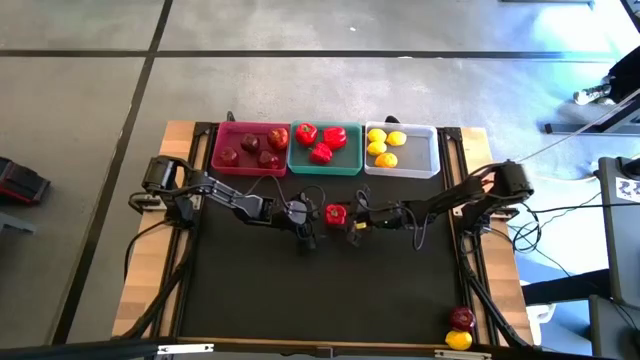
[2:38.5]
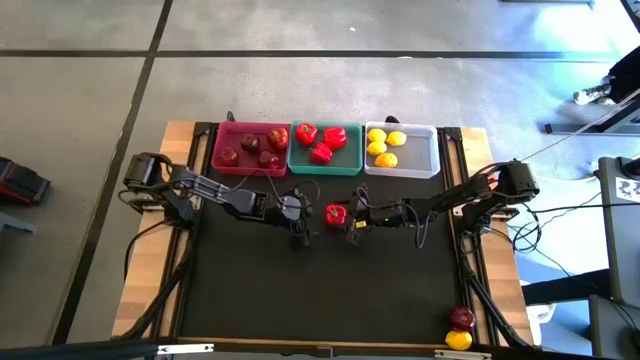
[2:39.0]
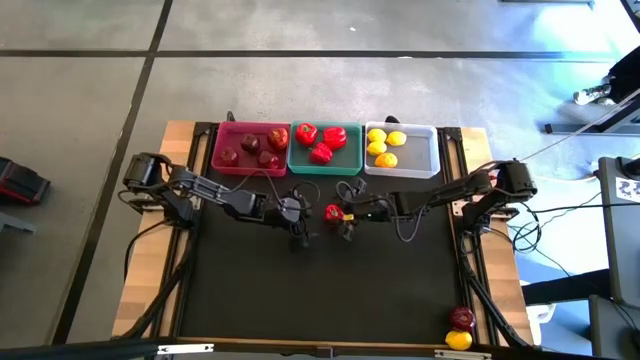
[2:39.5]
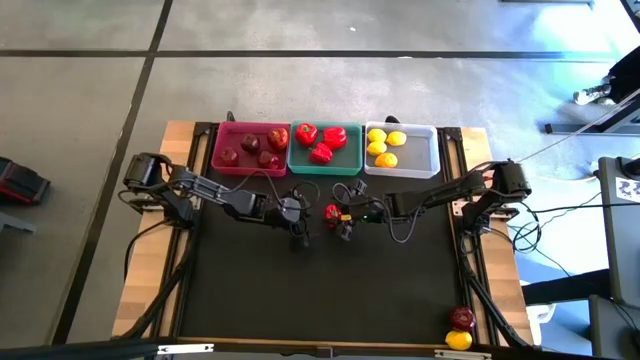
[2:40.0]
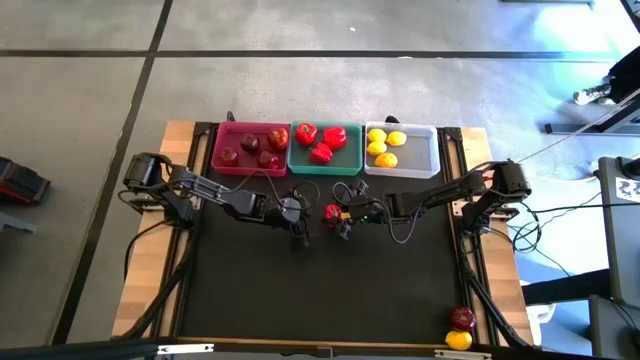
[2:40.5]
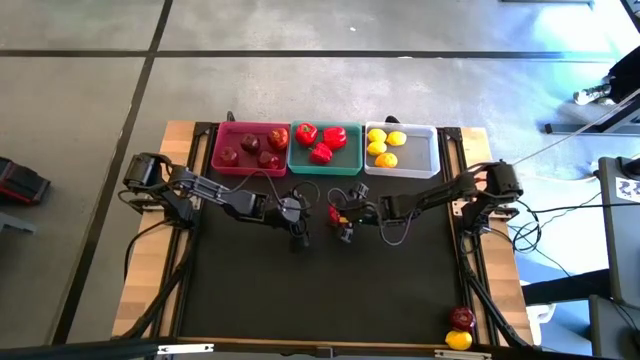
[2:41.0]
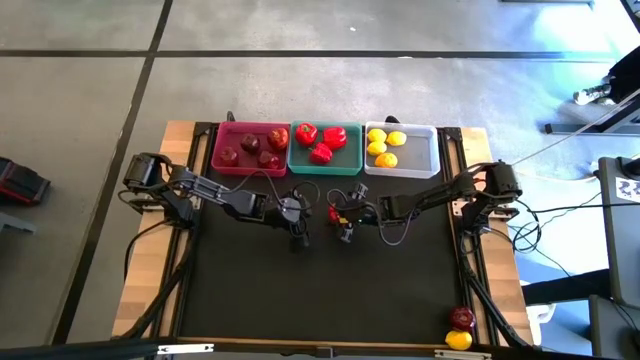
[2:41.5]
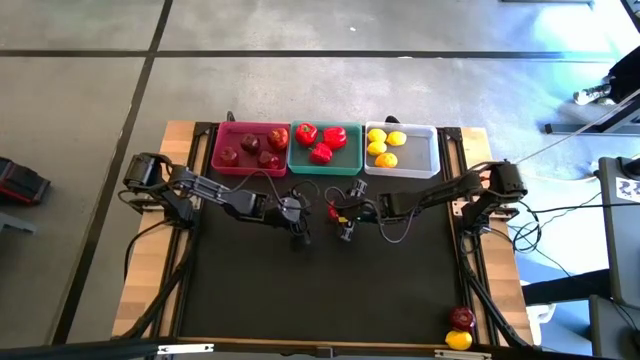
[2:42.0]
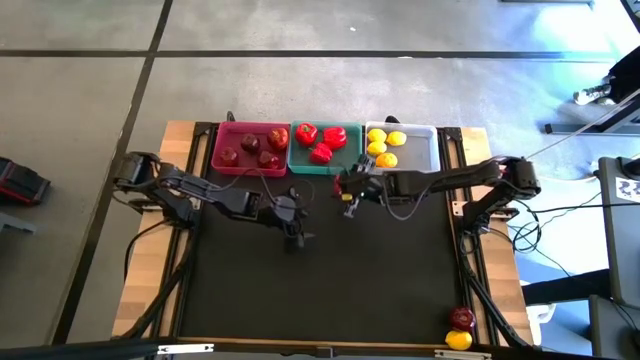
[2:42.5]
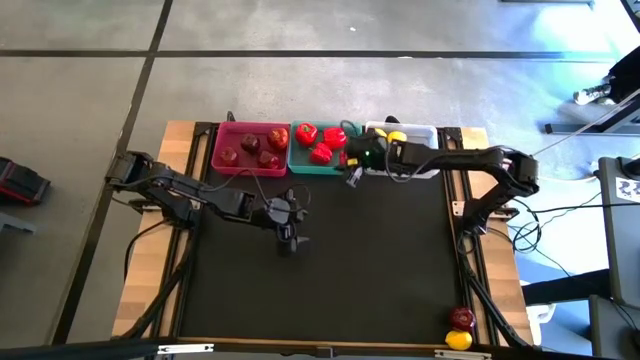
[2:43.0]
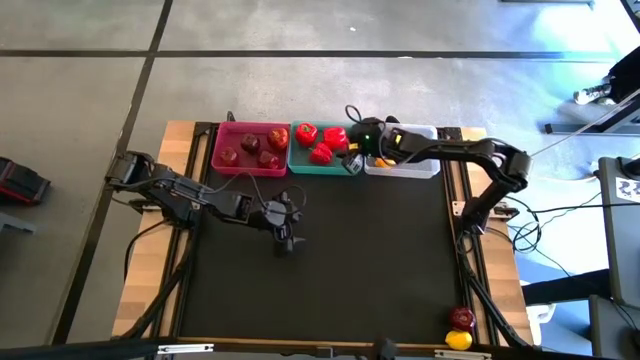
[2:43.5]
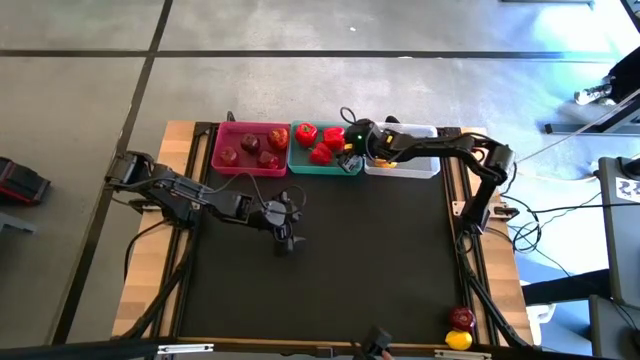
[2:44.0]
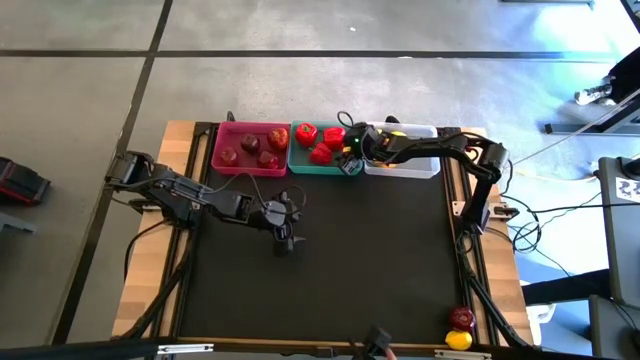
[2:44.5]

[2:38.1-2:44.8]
Task: Sort produce into baskets
Put the red bell pepper into the green bin

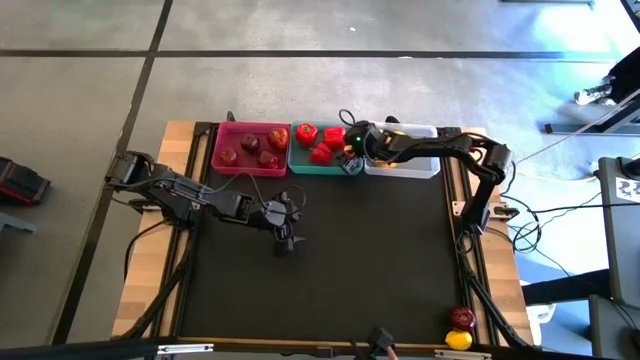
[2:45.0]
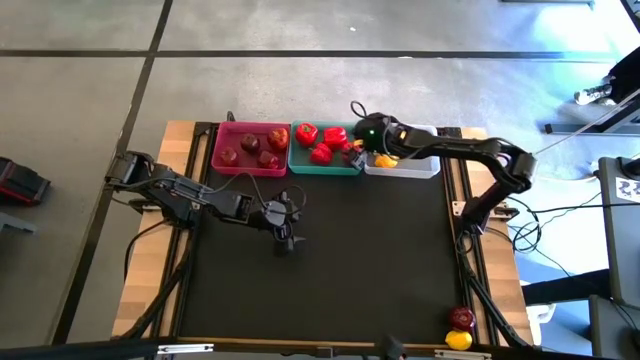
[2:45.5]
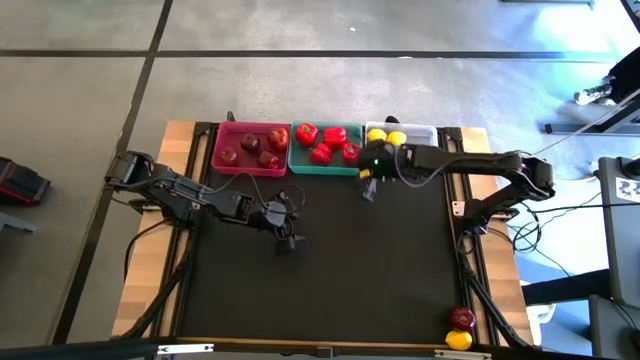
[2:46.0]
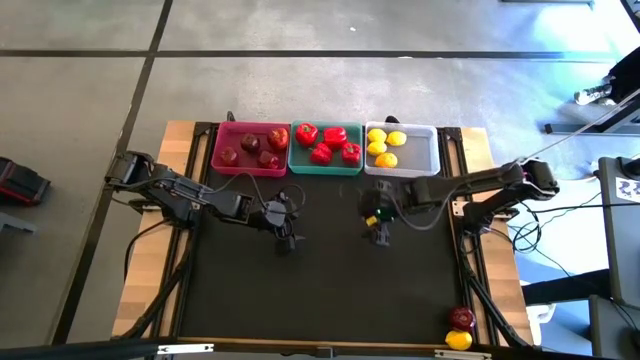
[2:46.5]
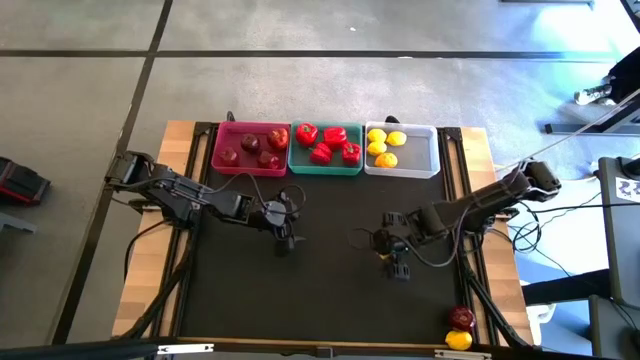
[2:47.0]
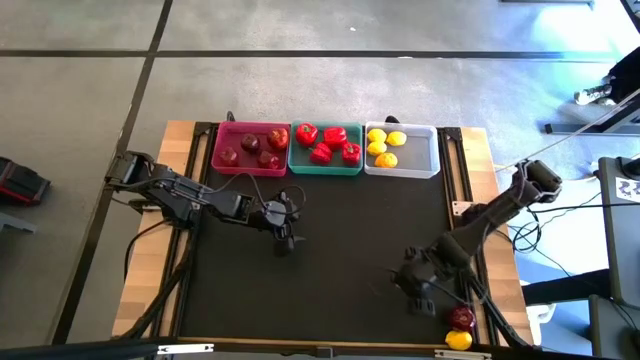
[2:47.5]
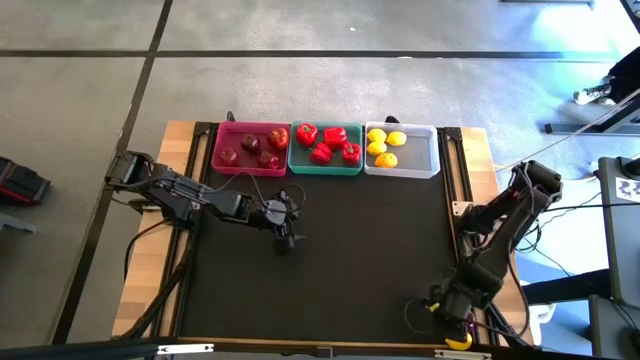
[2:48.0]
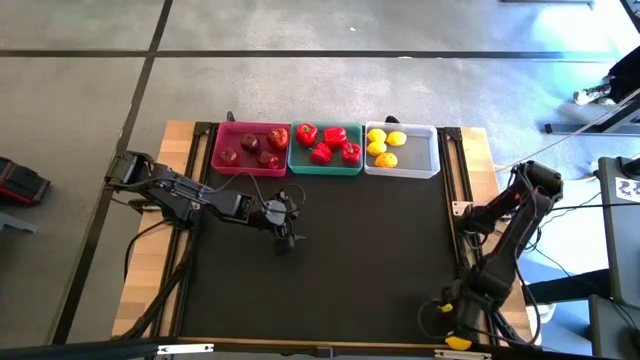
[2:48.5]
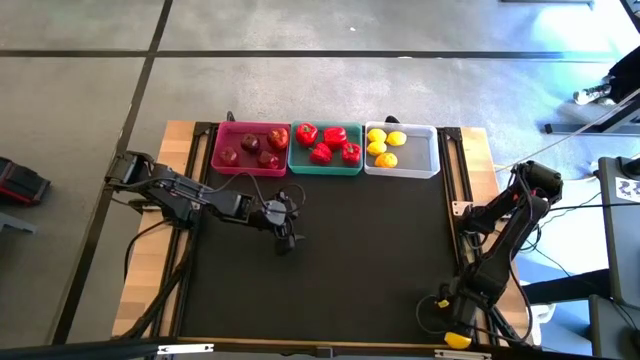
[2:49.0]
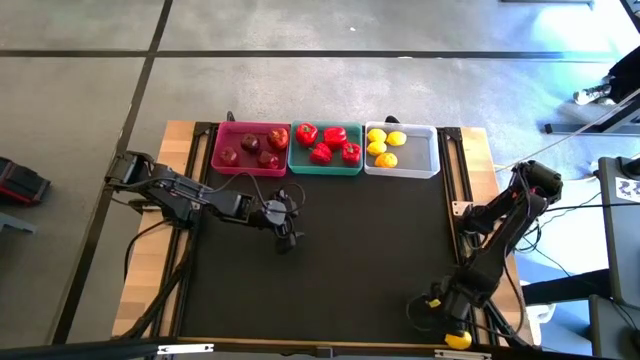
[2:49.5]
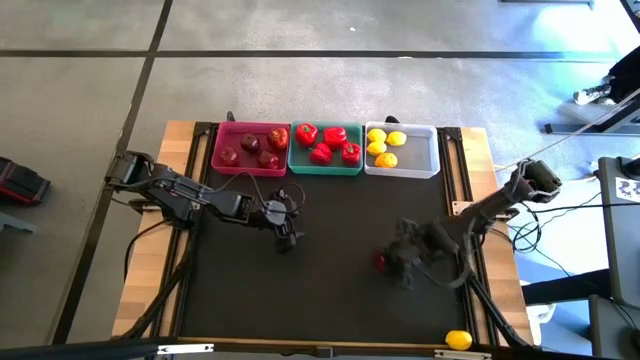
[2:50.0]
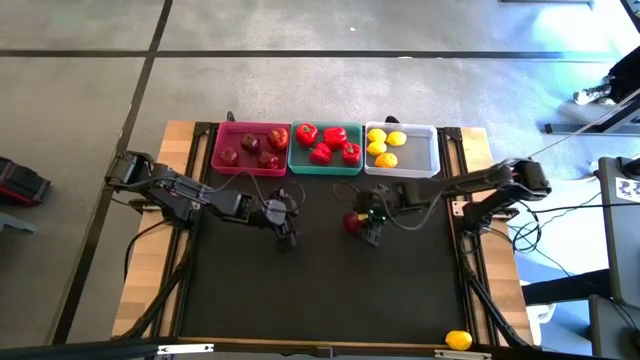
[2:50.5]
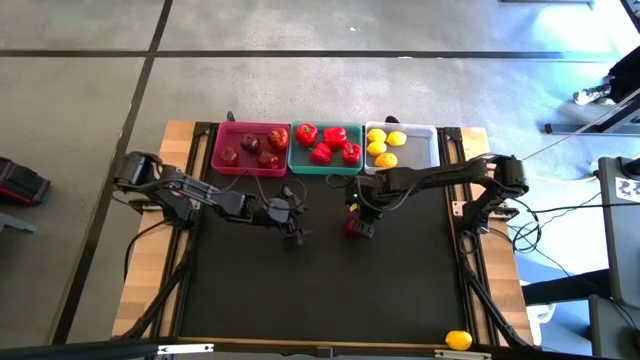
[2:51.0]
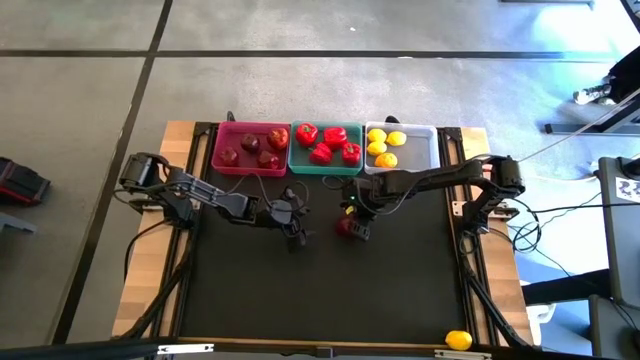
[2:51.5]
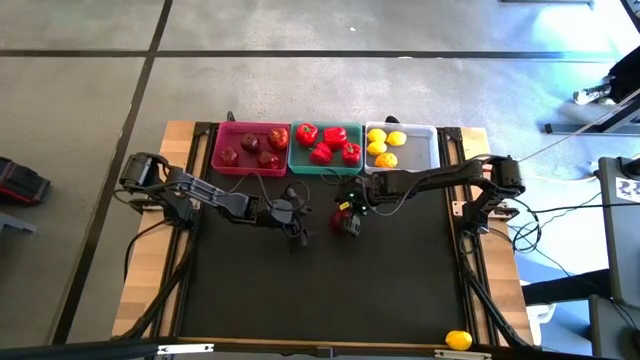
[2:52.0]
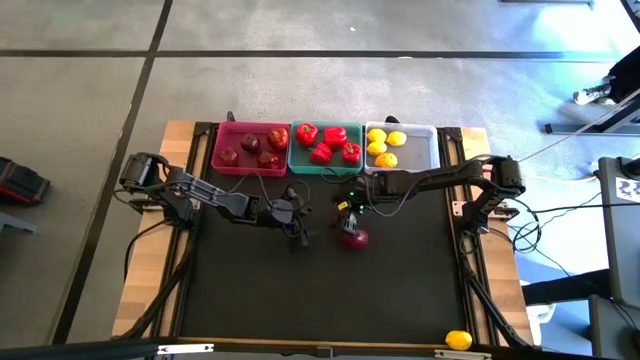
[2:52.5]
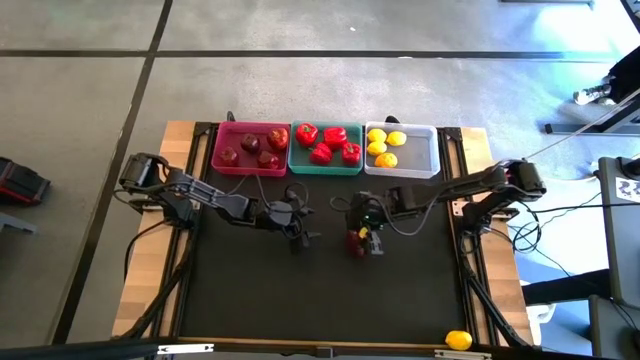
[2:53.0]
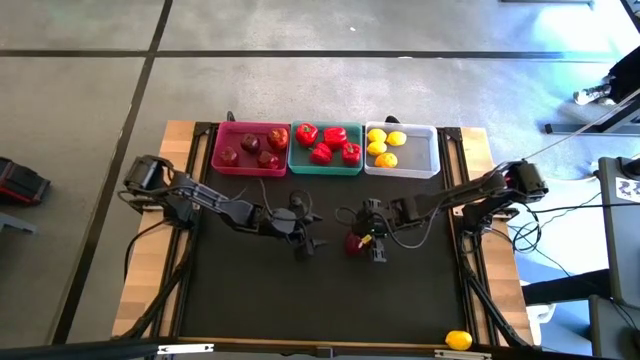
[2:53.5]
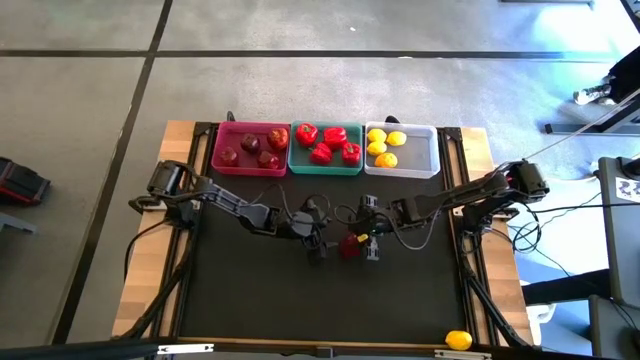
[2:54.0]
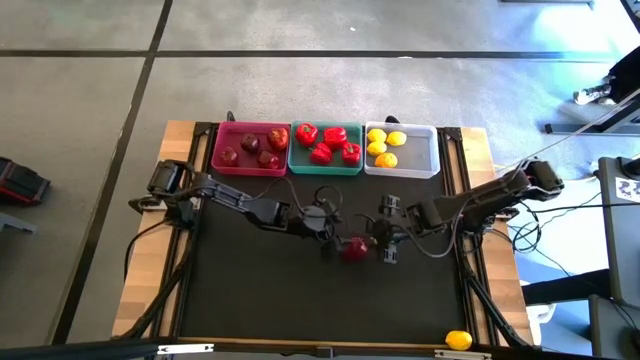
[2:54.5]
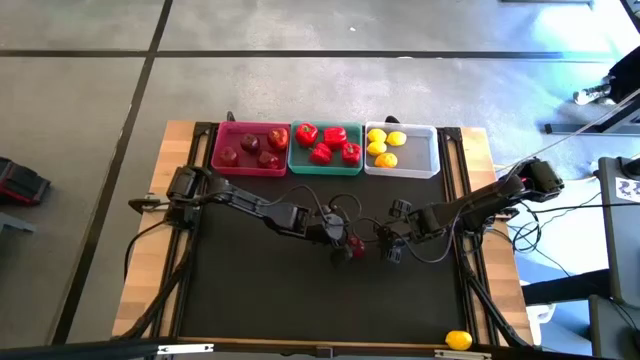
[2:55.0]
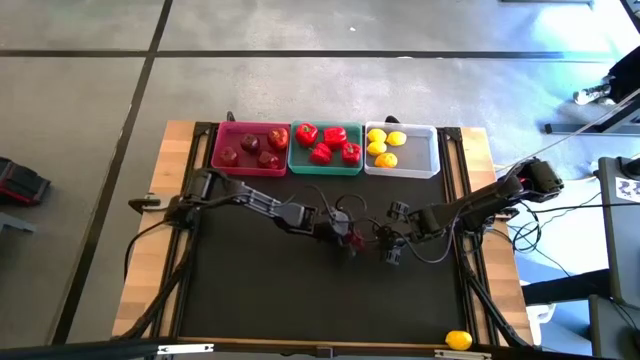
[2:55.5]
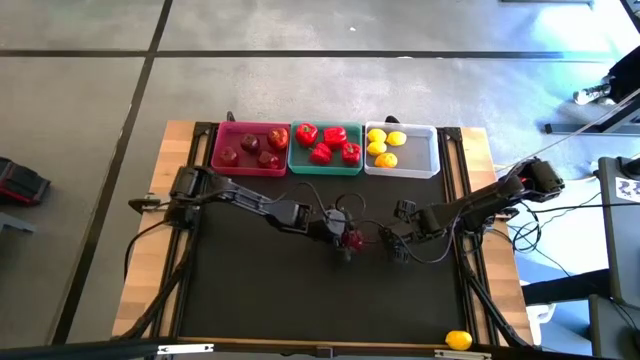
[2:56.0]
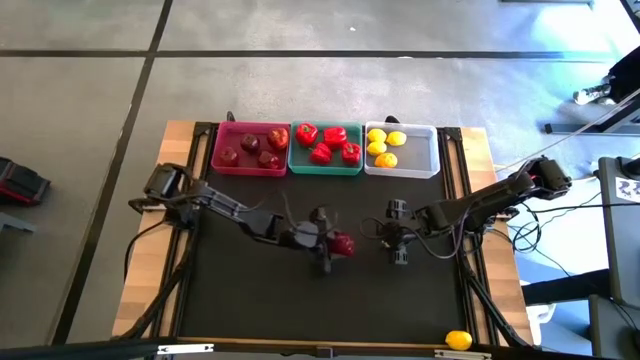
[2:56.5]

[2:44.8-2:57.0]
Put the apple into the pink bin
